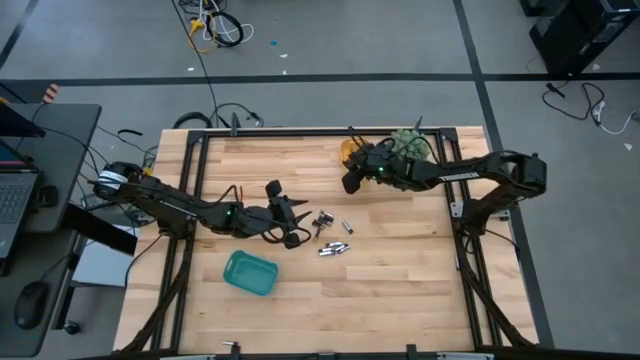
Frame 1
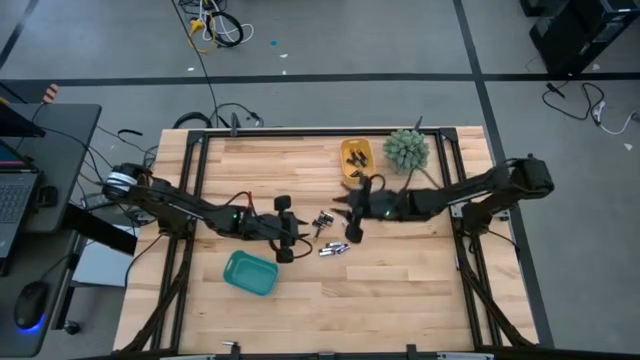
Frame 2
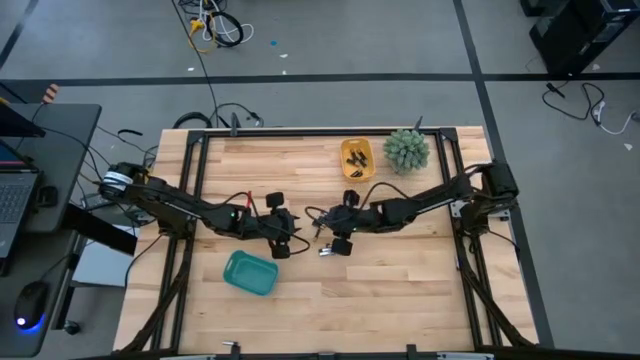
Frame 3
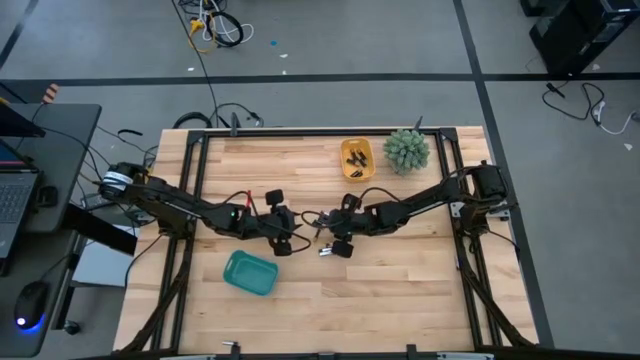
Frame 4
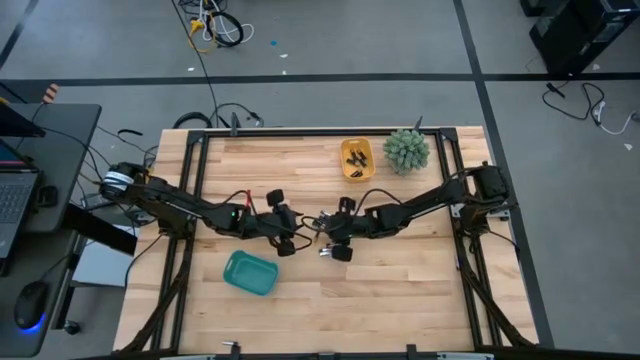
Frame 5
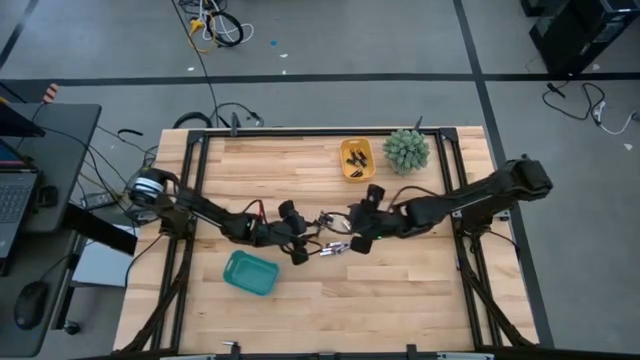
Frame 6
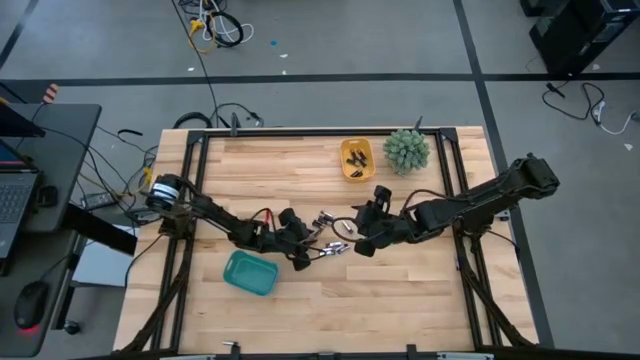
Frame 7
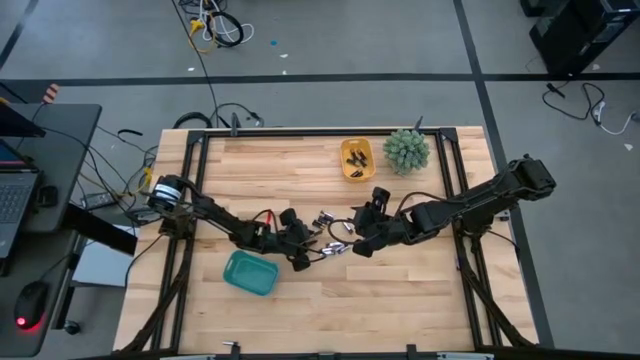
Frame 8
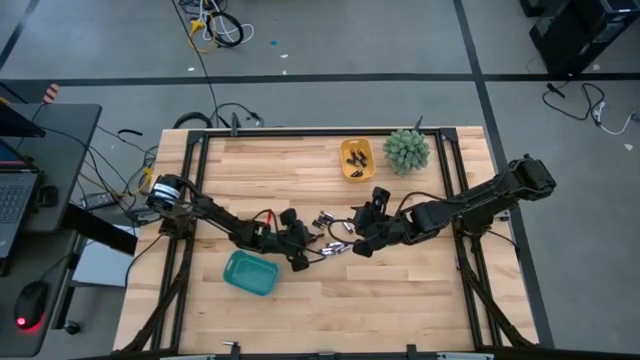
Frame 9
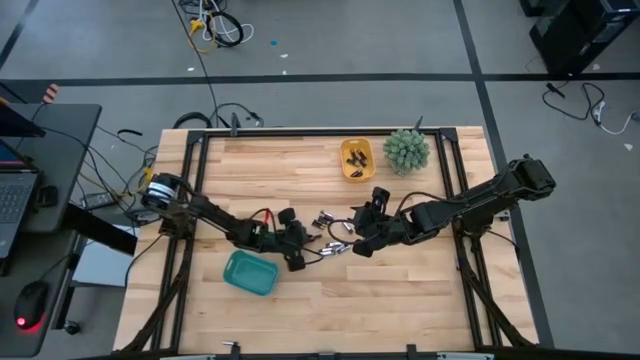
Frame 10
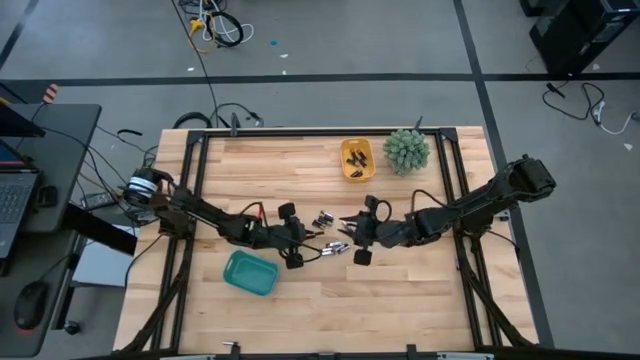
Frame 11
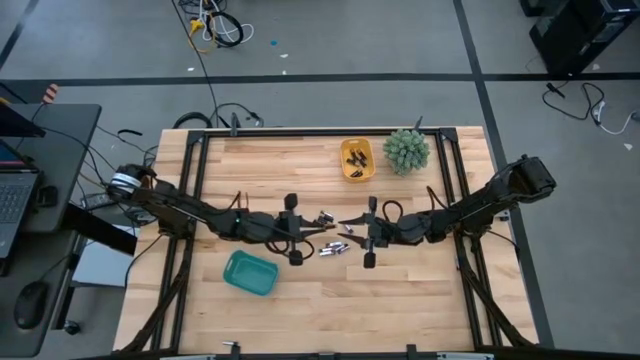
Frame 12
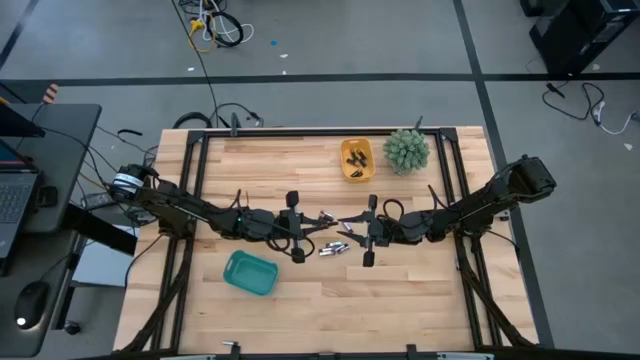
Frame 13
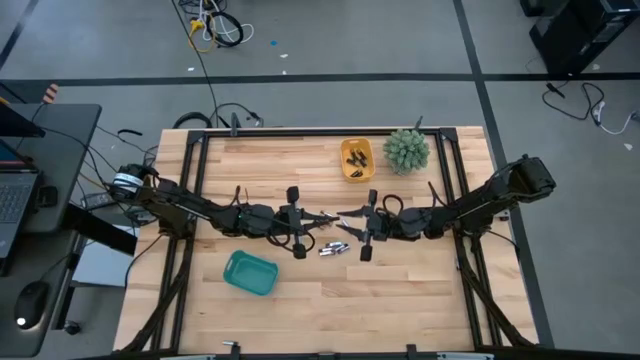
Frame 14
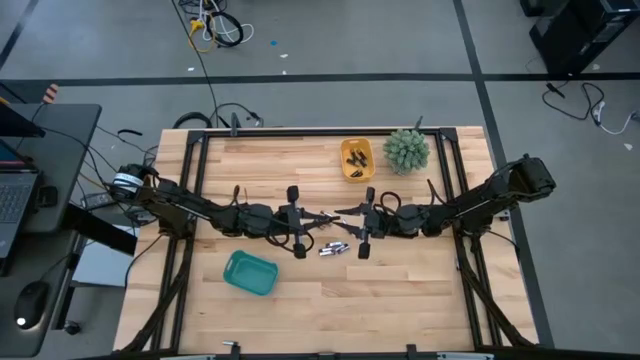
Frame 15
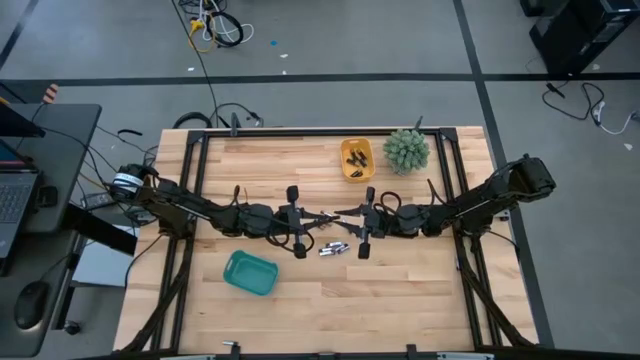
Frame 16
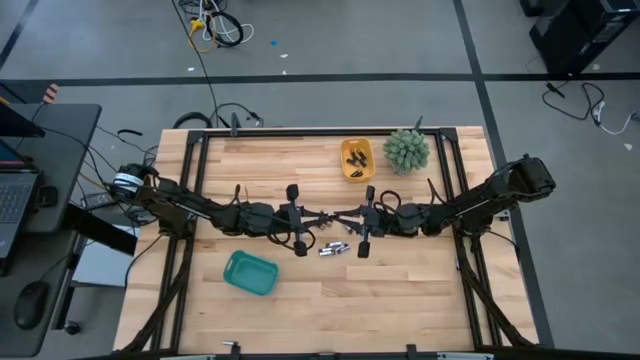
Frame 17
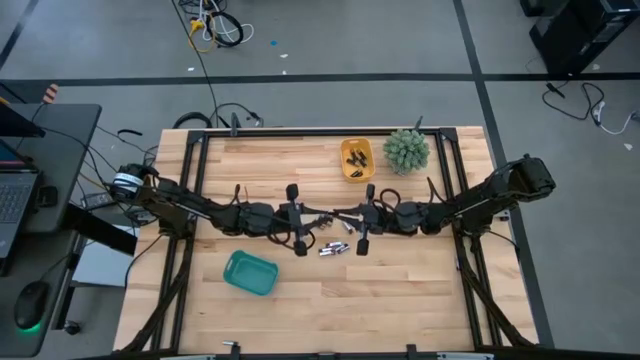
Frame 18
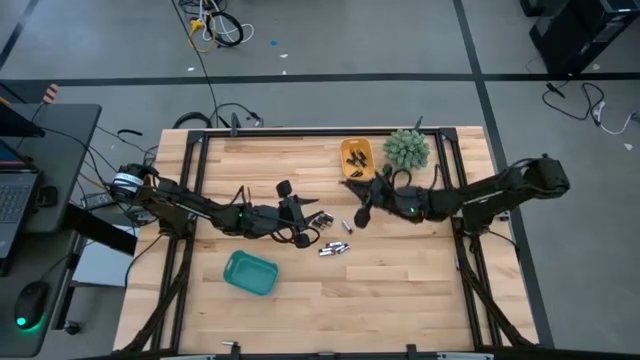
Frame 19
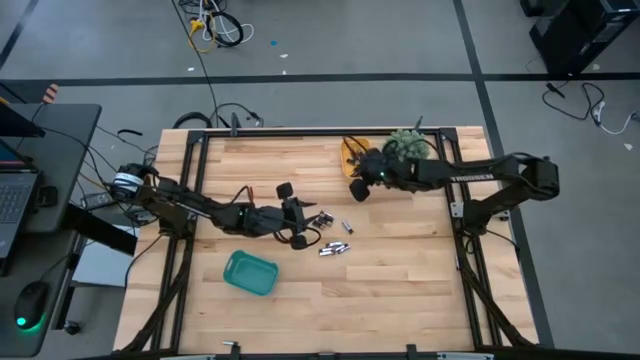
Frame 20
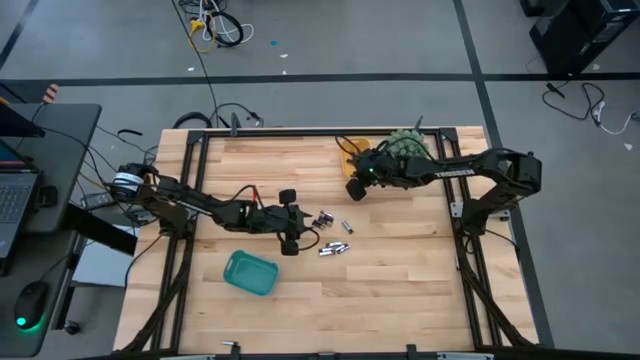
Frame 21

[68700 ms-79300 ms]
Task: Sort batteries
Put the black battery into the yellow bin

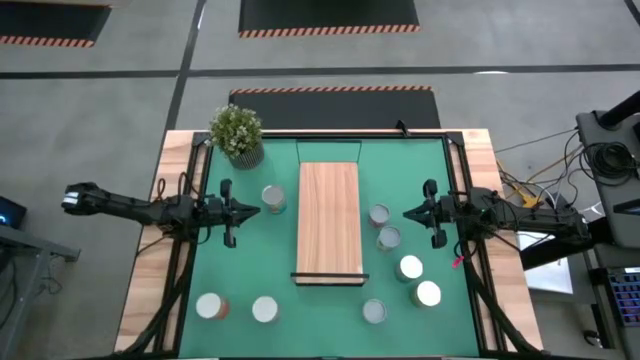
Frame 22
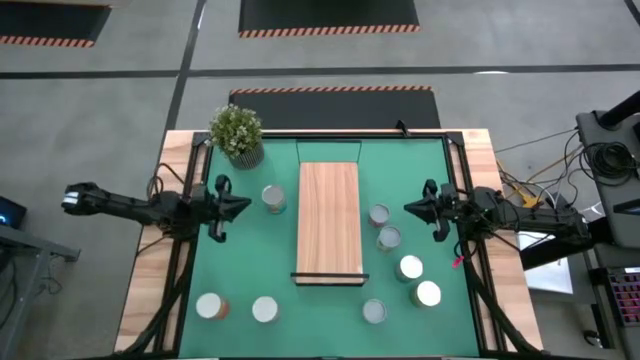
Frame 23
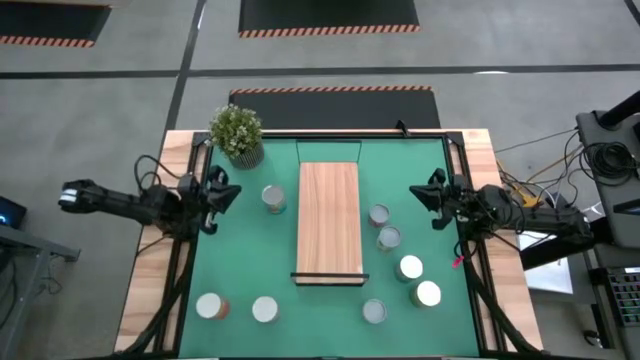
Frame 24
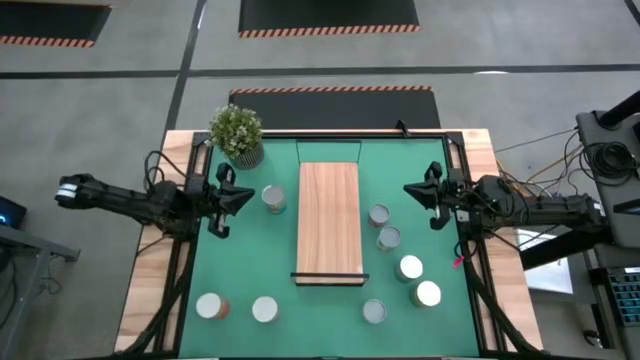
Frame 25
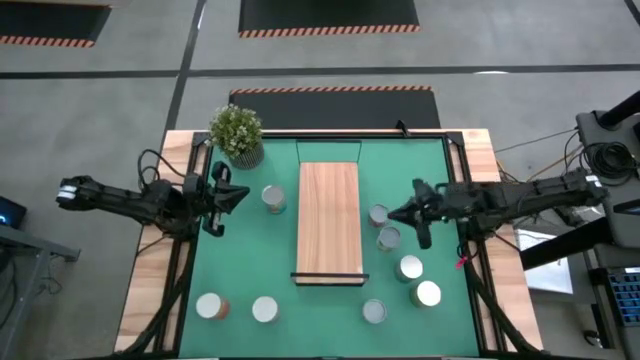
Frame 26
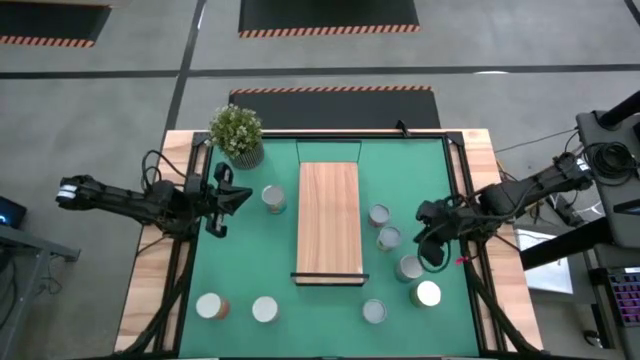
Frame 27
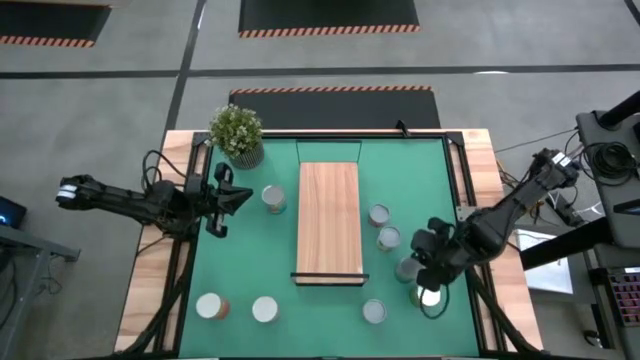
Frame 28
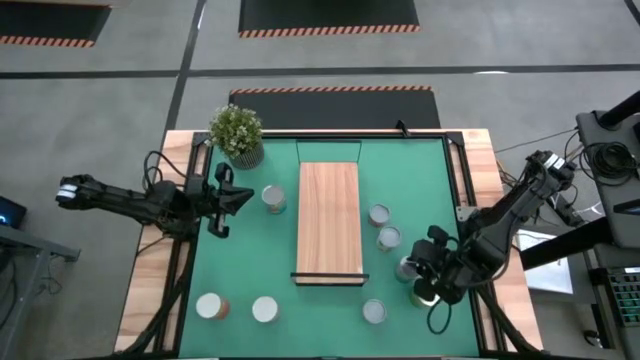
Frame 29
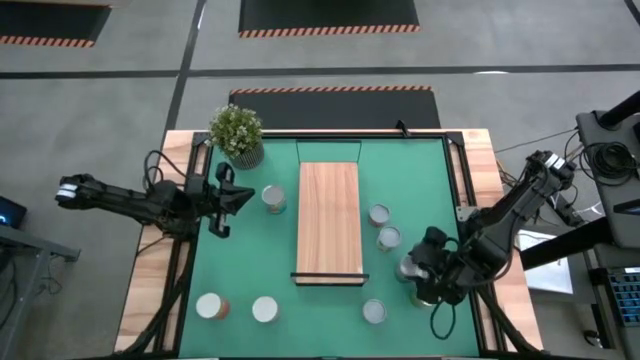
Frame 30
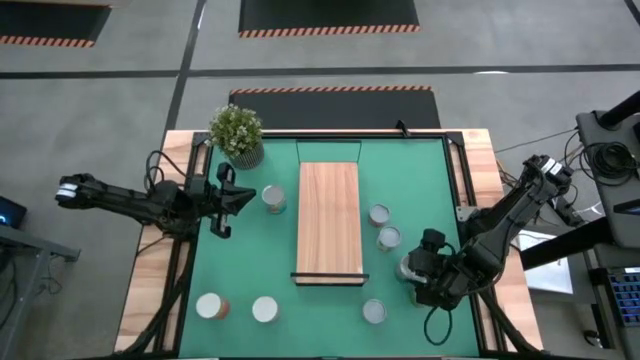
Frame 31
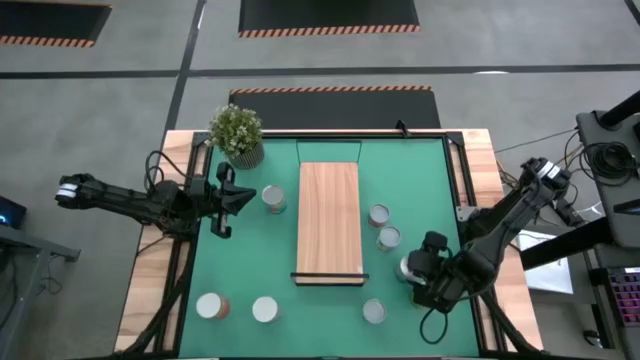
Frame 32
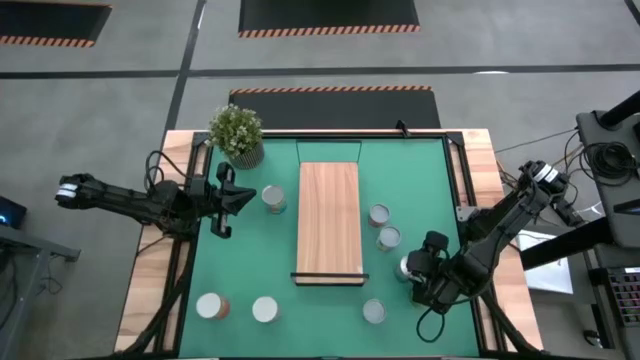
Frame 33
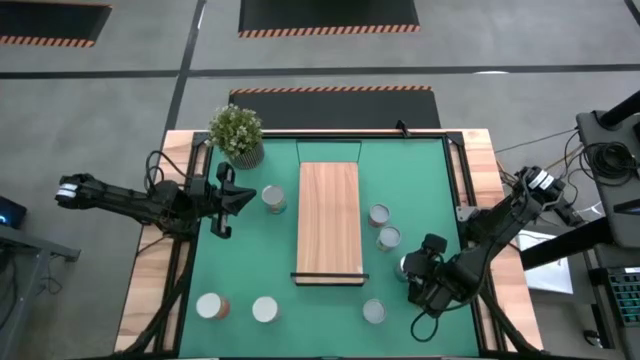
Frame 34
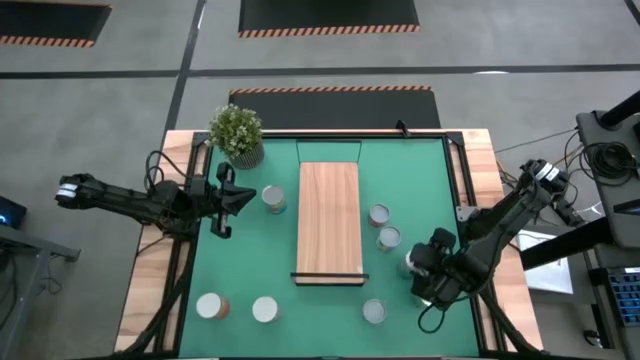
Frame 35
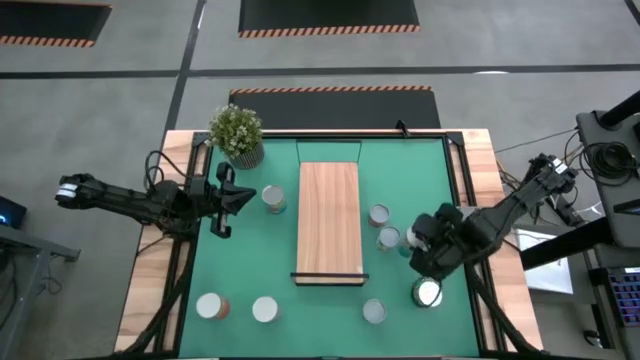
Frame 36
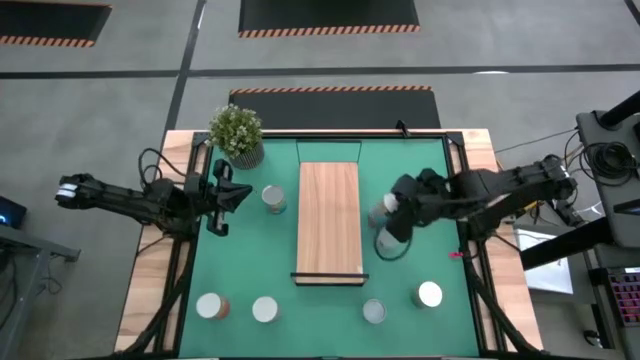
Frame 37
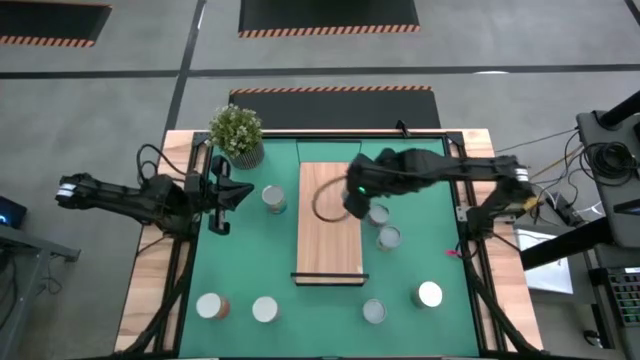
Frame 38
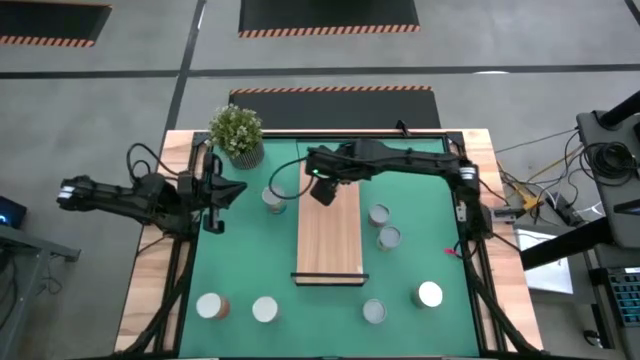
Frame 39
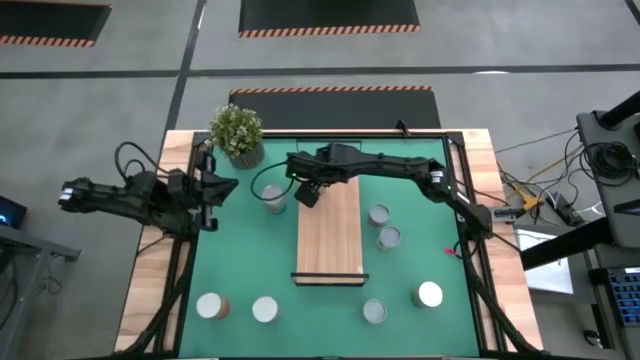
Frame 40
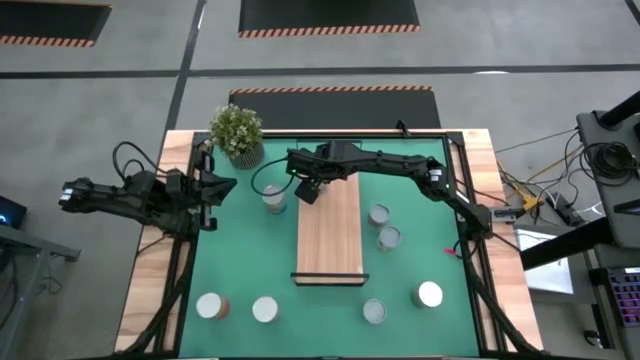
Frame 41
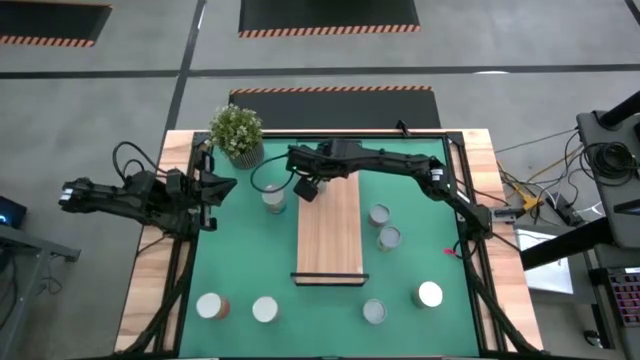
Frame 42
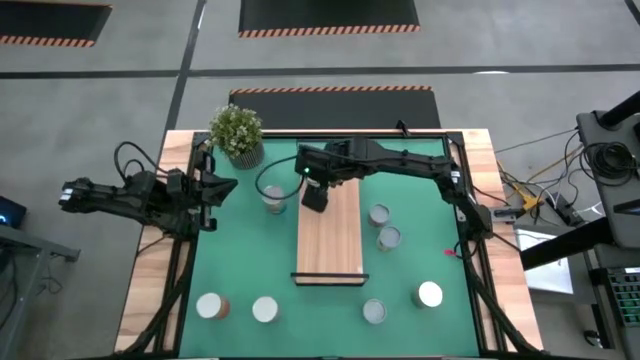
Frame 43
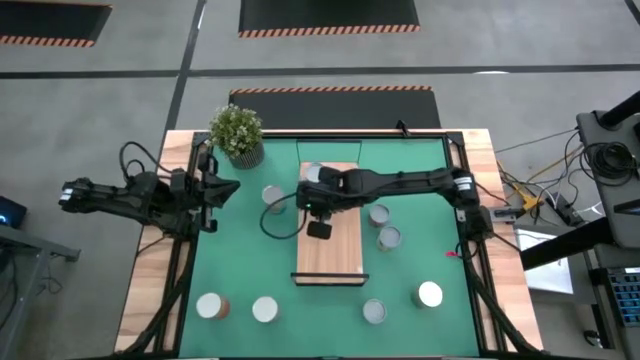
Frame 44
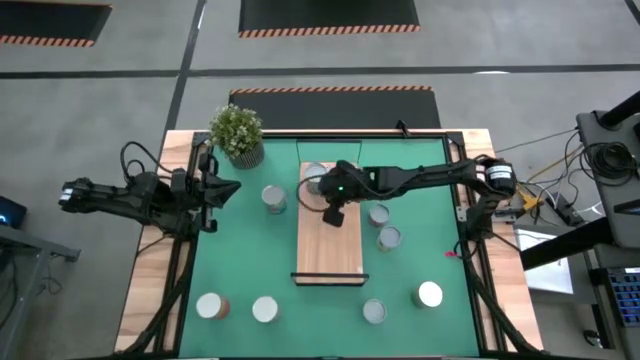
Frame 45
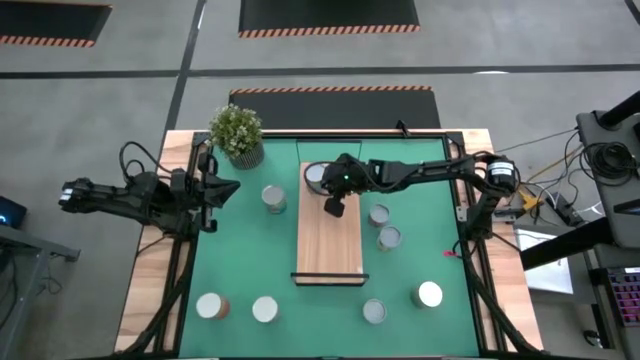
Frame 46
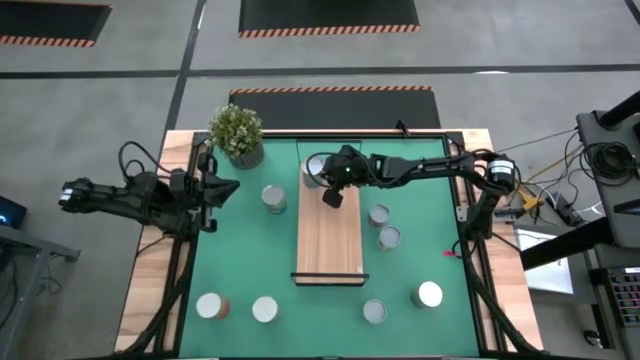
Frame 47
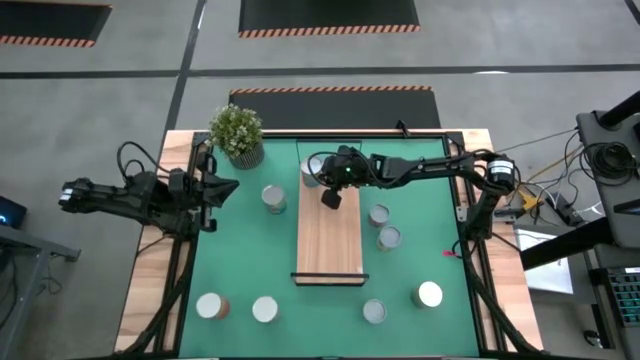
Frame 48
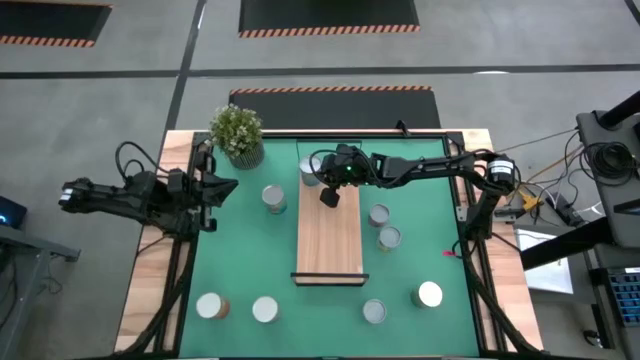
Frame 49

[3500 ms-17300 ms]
Task: Pick and place cans onto a shelf
Put the canned cherries on the shelf
